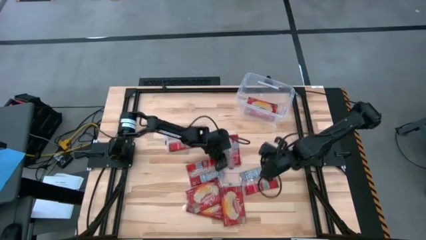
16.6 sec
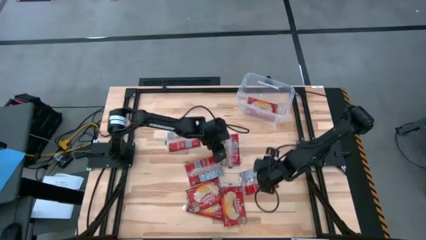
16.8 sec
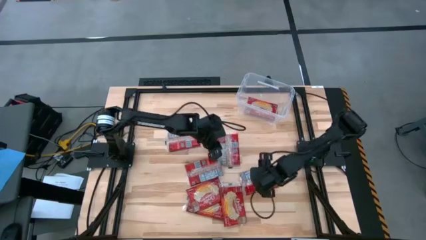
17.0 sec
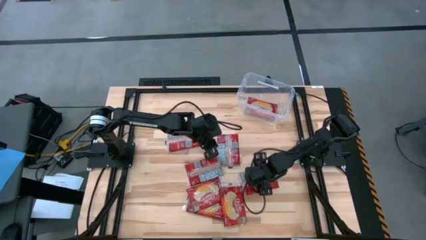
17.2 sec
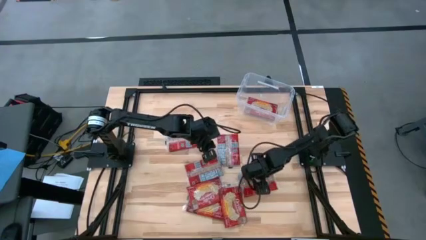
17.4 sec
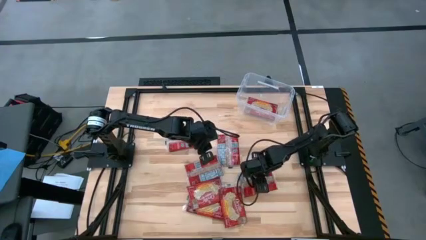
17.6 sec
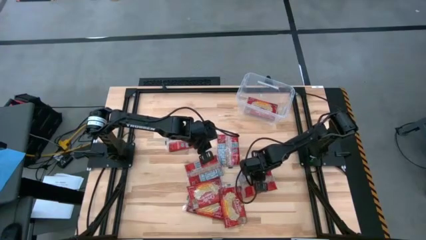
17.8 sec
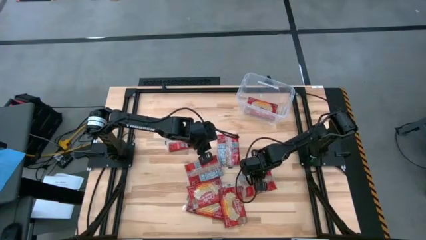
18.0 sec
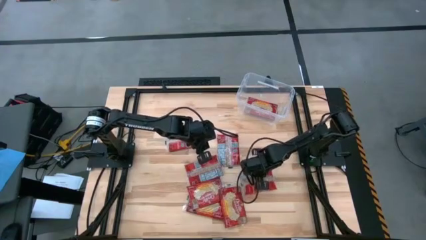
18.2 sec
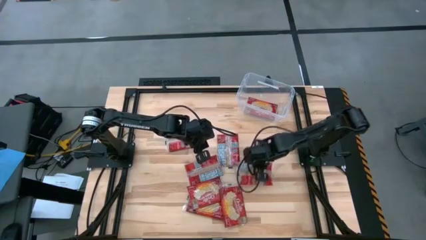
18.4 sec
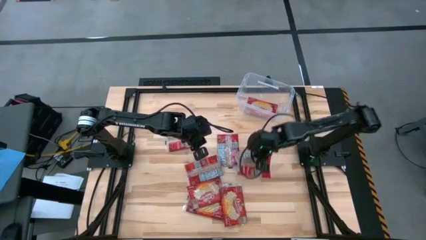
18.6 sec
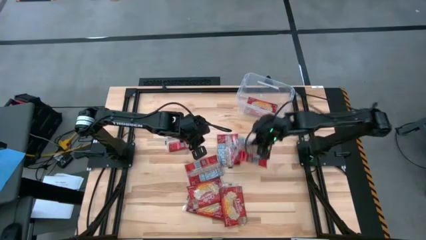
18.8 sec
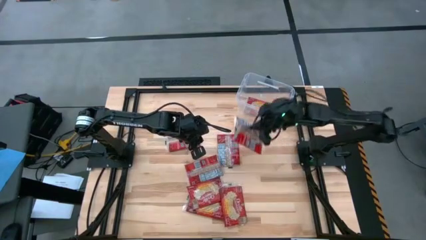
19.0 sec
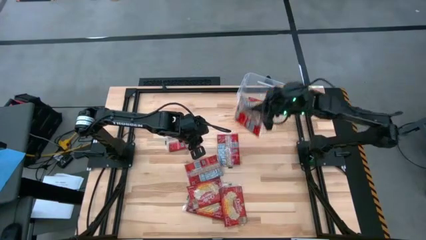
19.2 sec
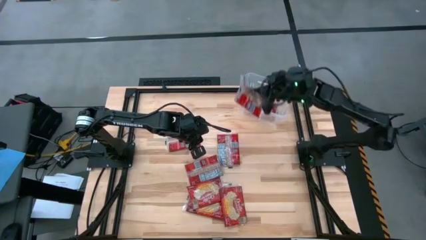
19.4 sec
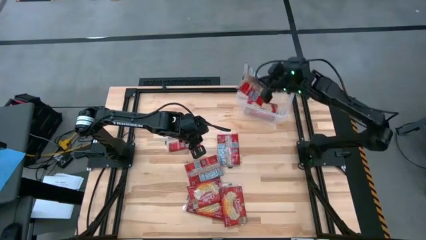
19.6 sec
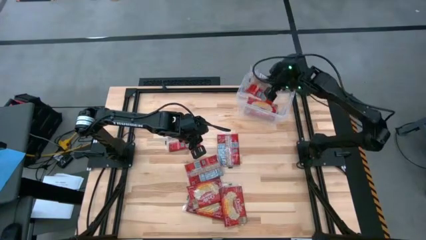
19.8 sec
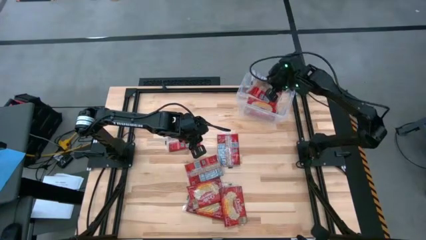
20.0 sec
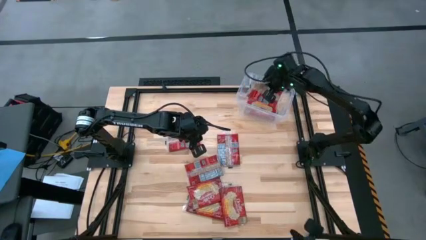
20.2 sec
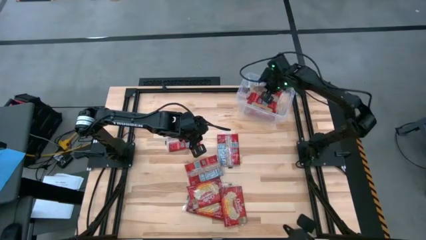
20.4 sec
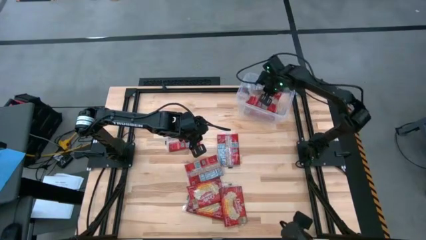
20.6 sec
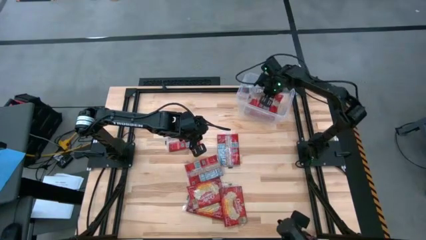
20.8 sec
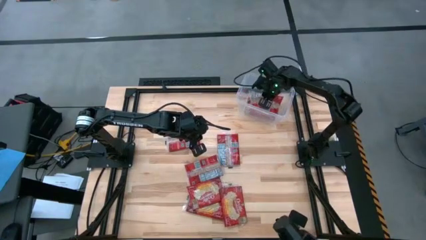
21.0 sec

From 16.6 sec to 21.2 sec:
Task: Sort popcorn bags into baskets
Put the red popcorn bag into the transparent bin

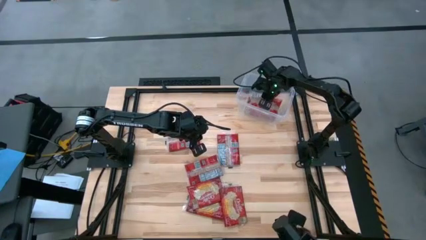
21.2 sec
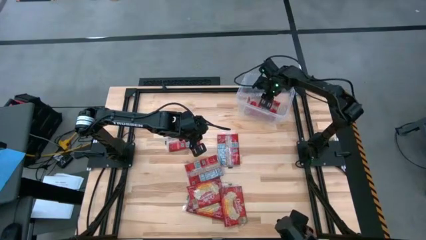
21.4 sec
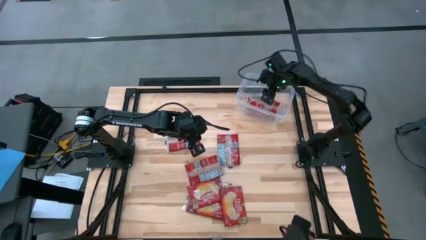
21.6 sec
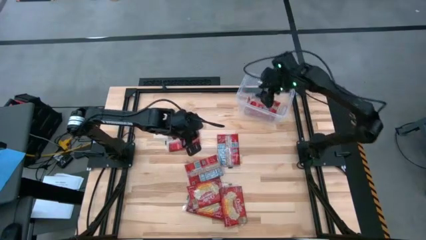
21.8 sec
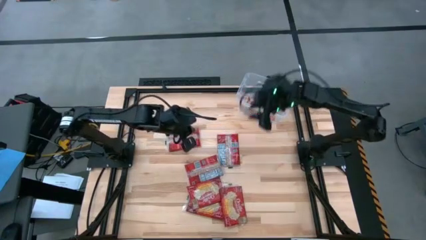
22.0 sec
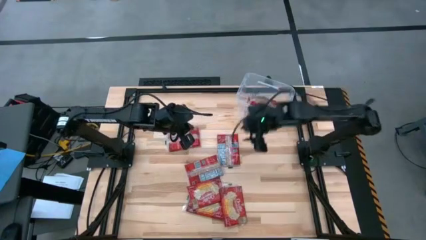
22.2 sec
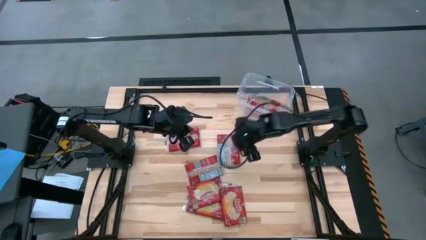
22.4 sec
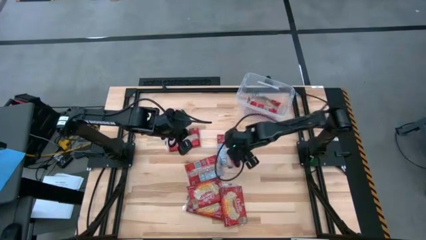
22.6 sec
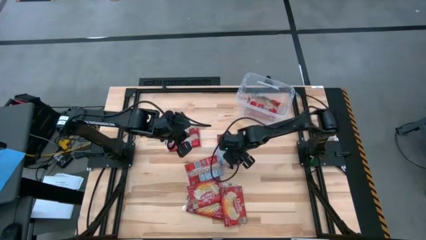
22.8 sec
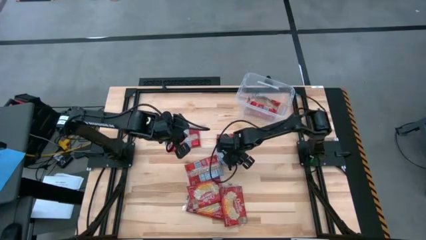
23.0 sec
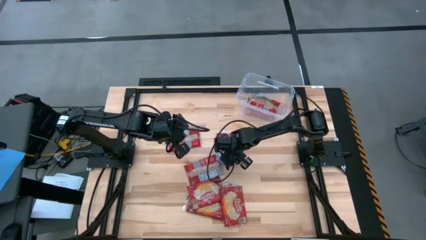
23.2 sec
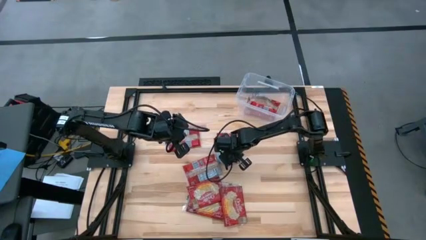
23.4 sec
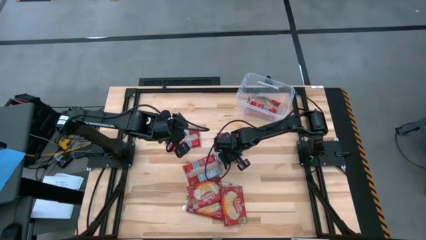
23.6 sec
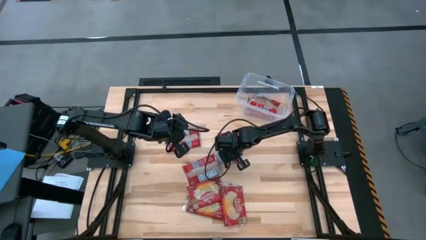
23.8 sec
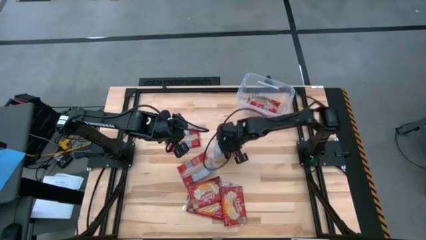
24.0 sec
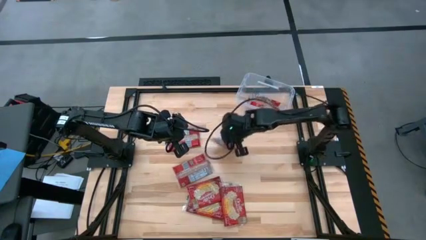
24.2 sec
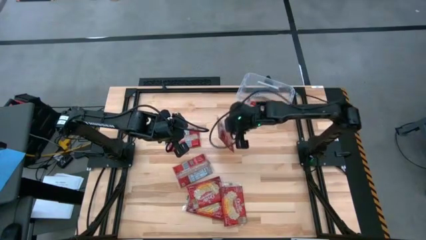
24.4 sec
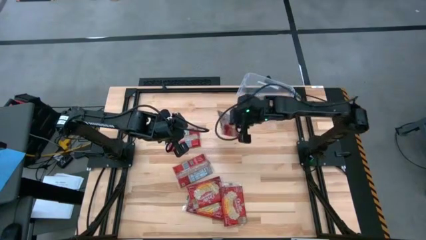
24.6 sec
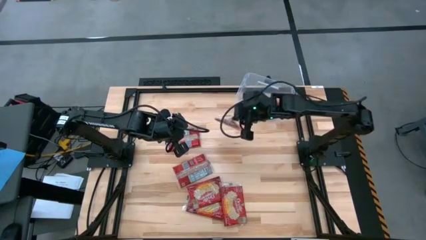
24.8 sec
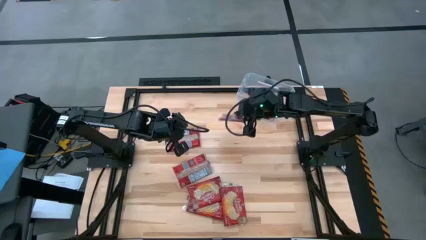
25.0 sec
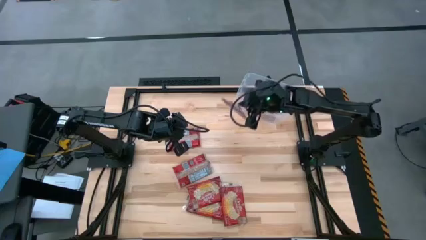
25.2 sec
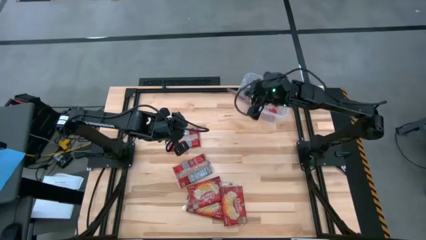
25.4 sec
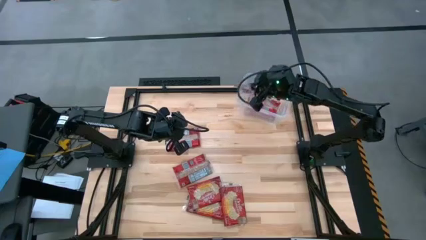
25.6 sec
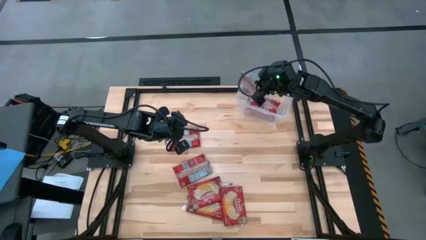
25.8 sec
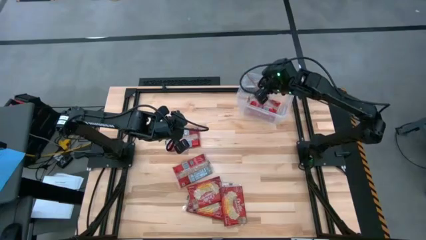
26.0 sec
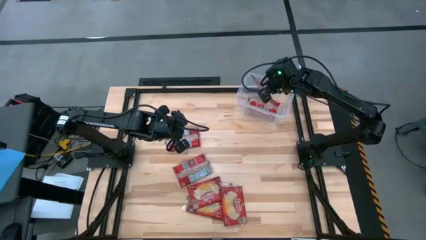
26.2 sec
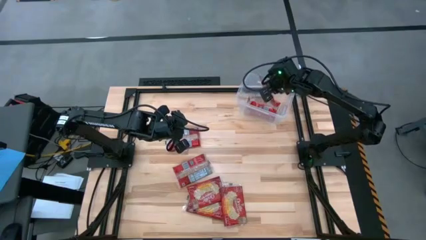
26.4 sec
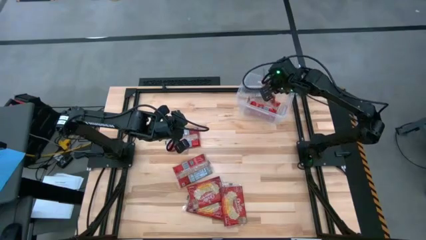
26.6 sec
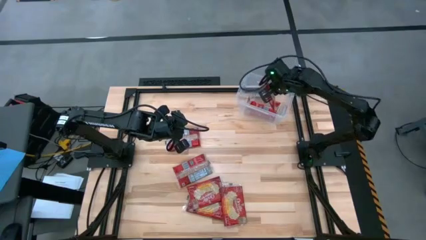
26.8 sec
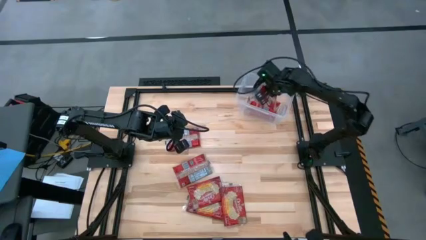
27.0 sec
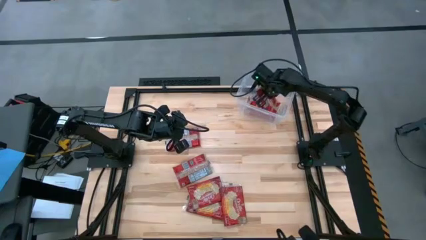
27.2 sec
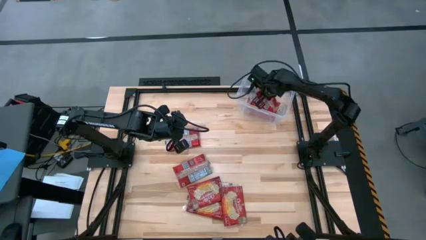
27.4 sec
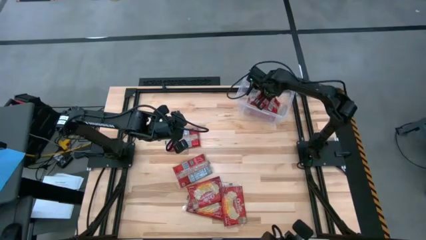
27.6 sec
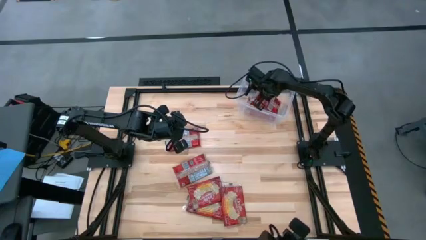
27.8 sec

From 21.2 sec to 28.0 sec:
Put the red popcorn bag into the transparent bin

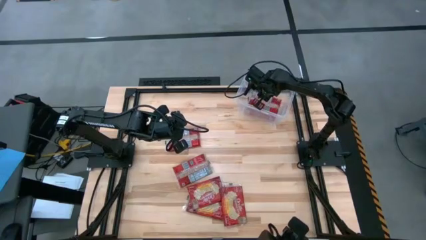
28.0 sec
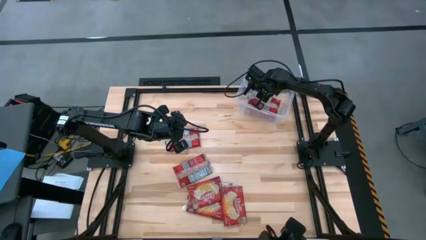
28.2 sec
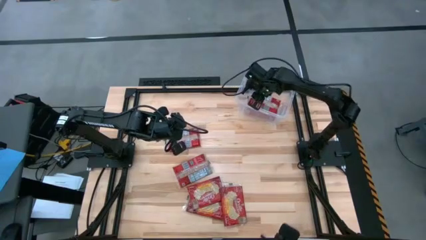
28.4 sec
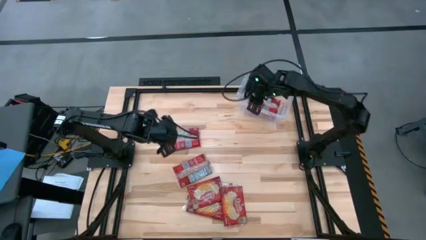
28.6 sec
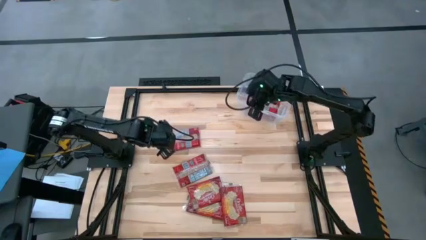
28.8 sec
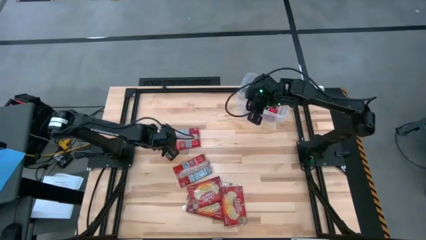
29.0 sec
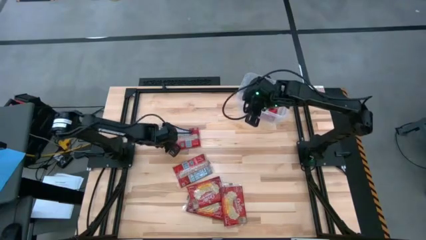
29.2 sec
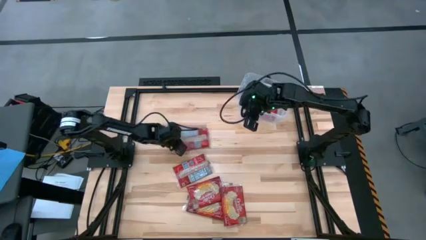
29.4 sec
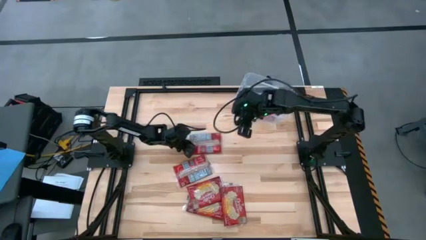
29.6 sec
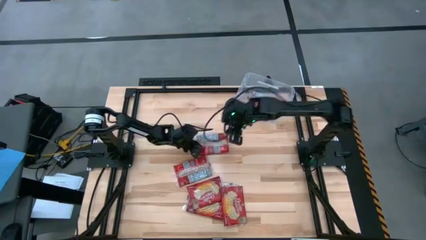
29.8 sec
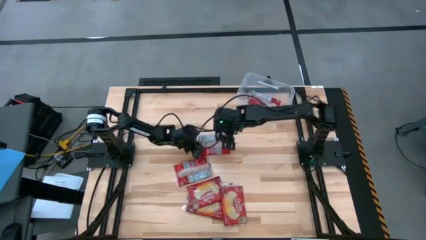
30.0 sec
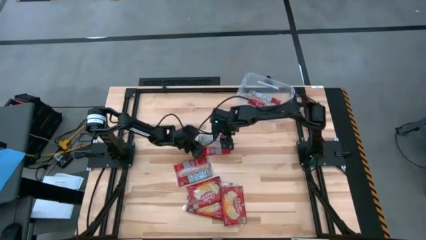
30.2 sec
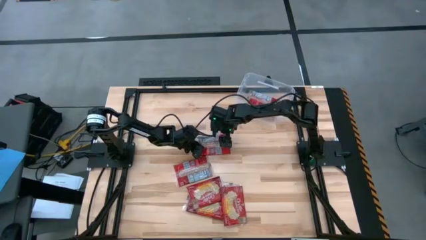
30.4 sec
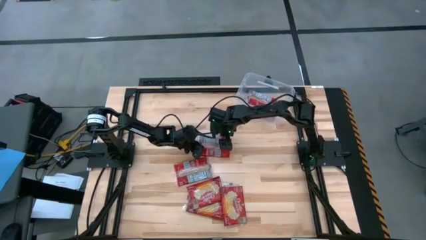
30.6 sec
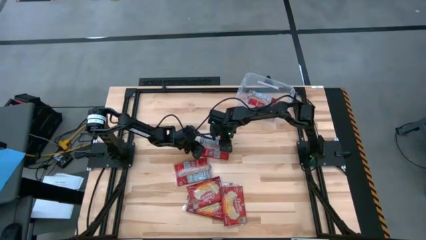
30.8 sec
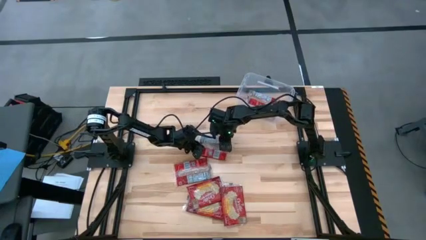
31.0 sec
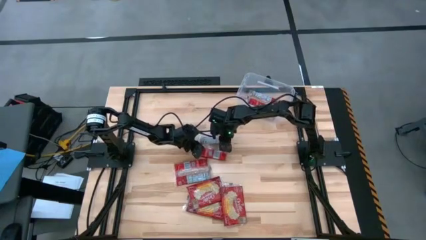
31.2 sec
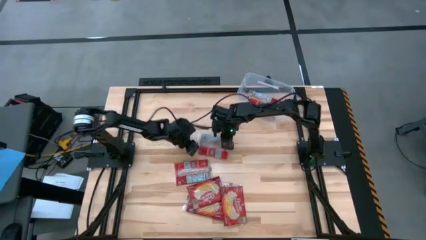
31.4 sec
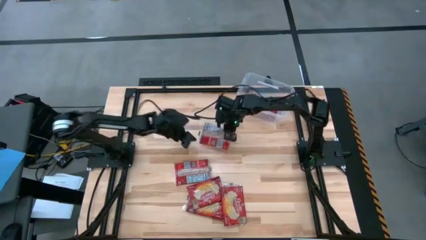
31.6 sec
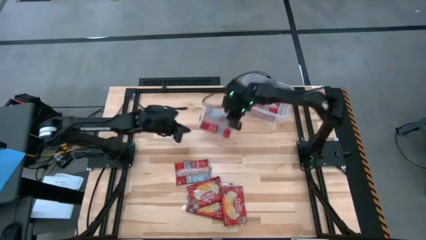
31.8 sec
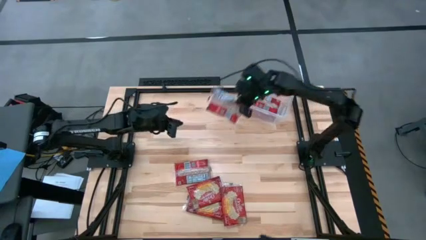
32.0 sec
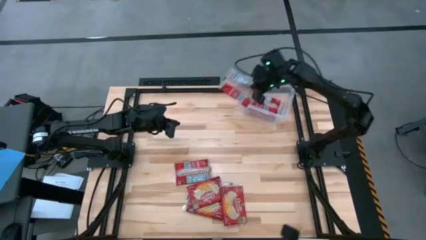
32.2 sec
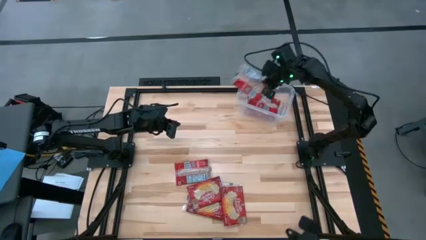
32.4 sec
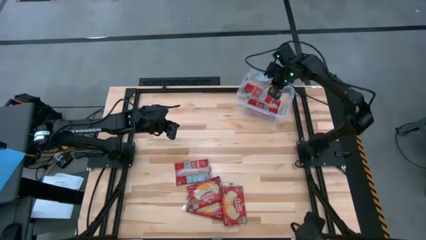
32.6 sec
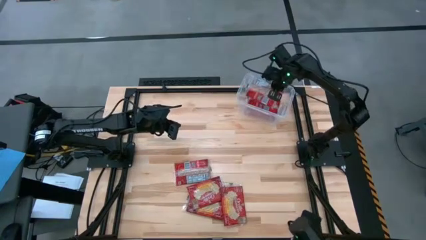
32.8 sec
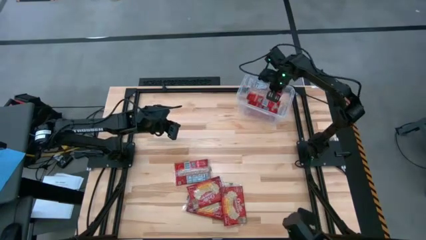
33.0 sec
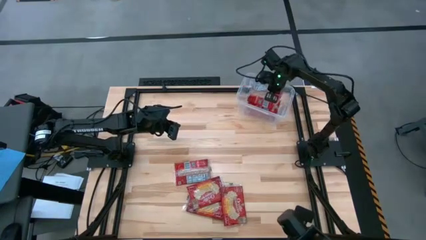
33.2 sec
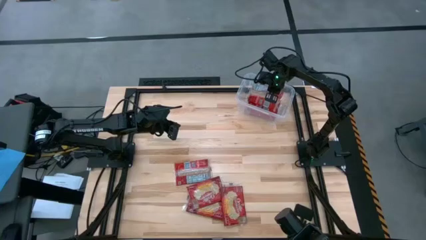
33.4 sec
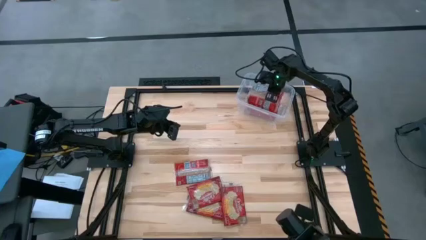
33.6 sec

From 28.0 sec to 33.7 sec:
Put the red popcorn bag into the transparent bin
